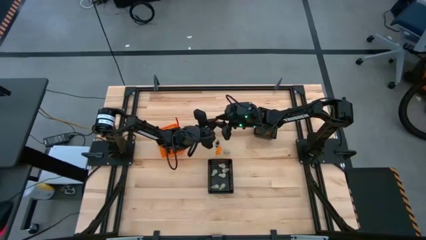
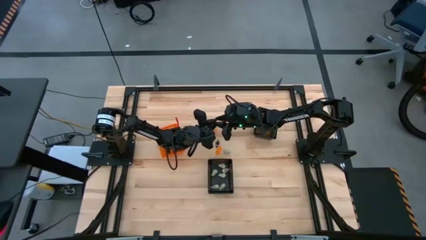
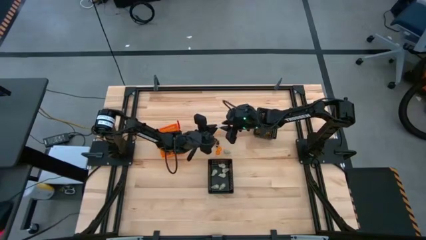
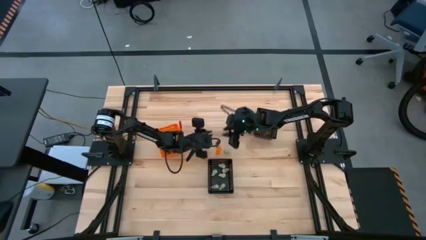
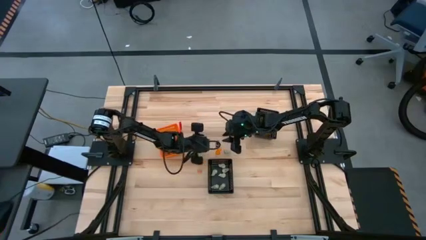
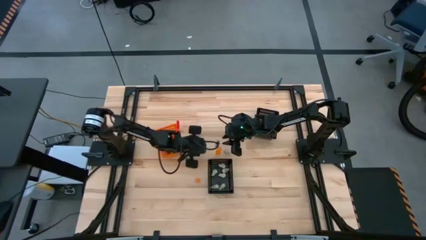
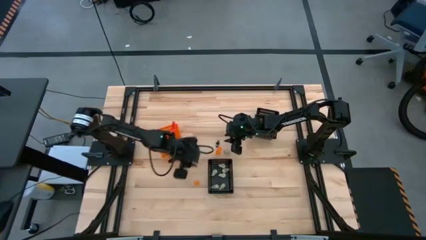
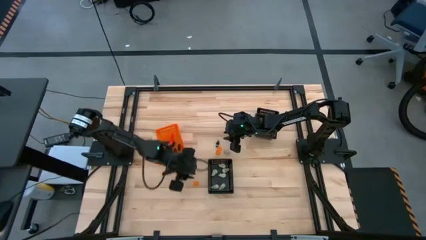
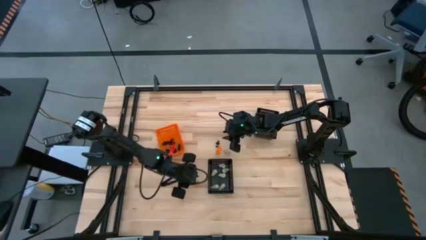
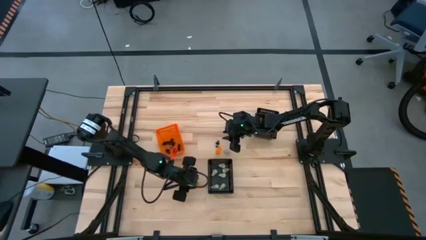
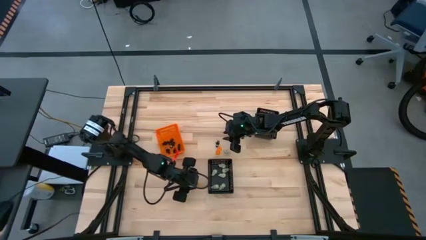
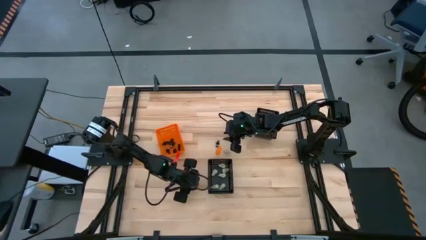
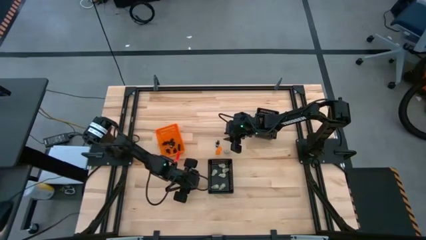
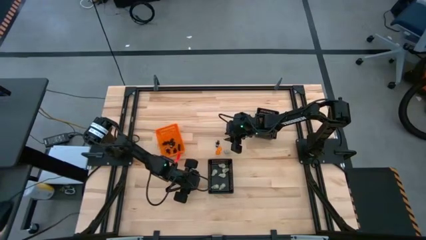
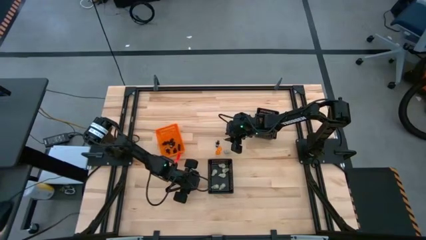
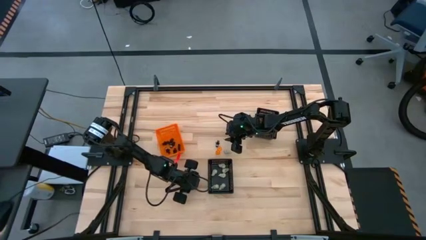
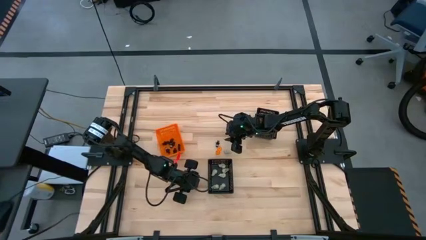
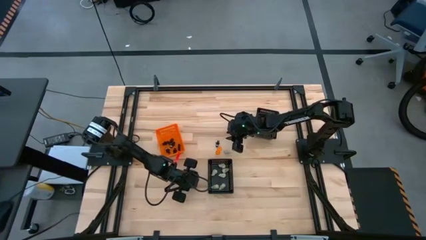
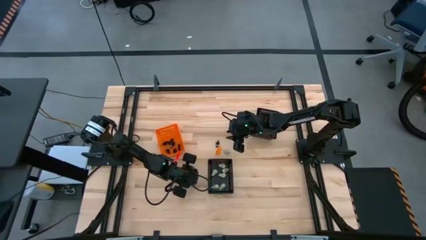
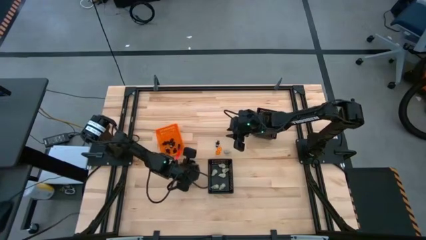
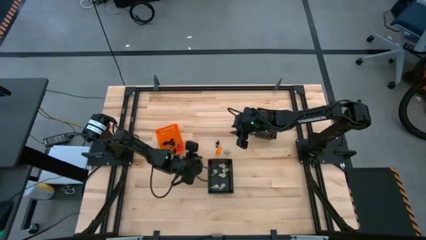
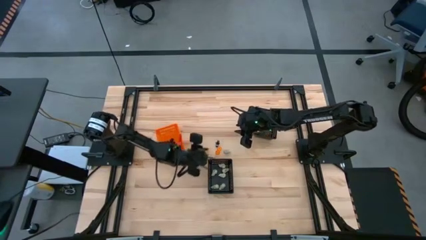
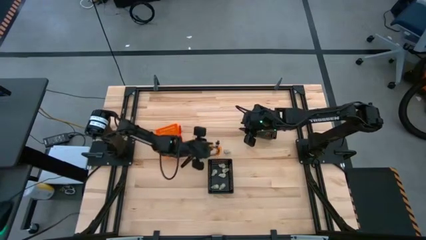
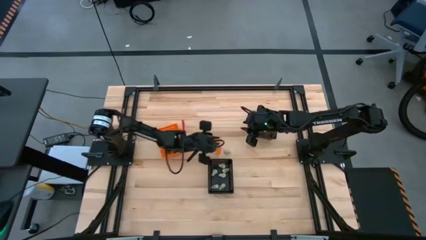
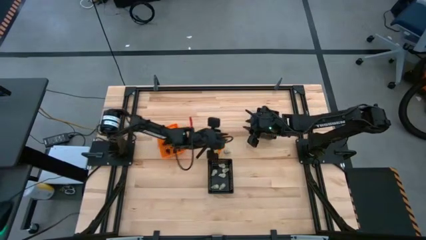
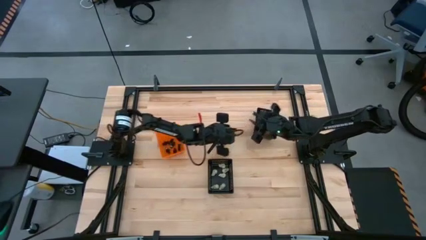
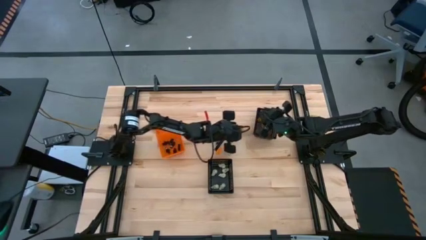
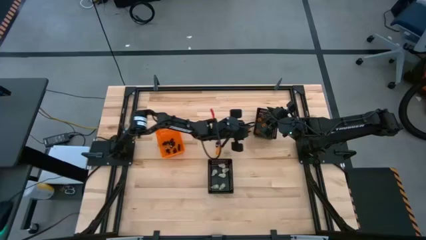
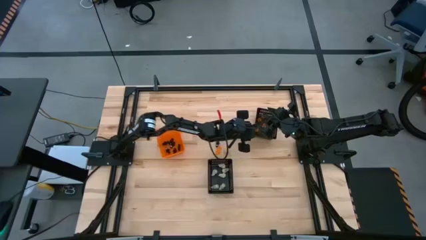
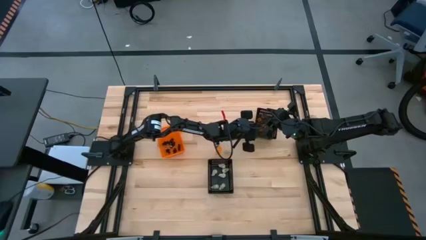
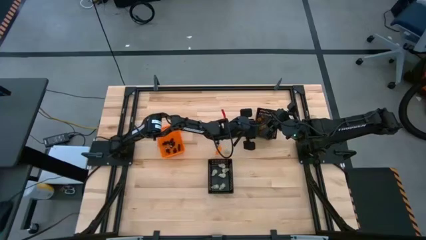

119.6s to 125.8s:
Task: Sort Halloween decoration
Put the orange pumpkin toy into the top black bin

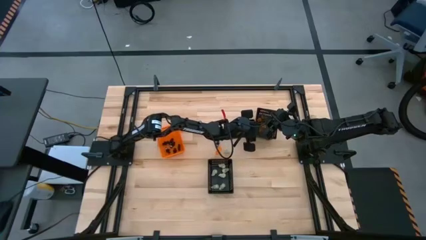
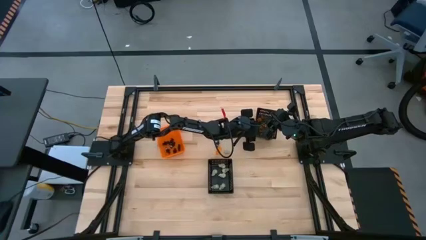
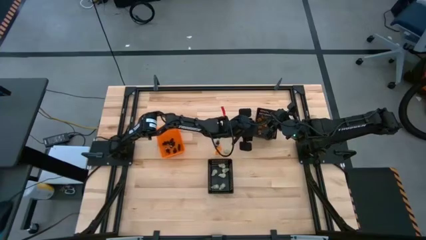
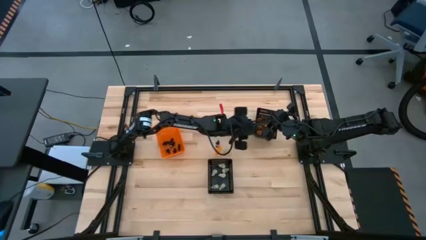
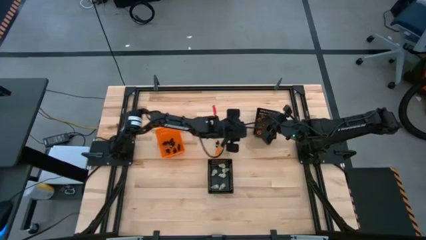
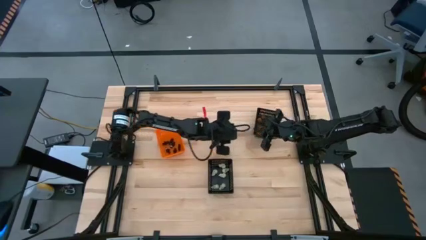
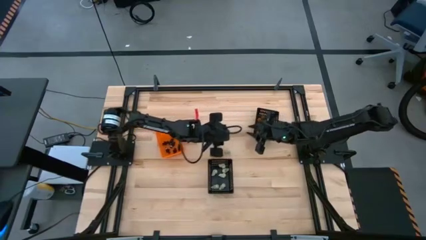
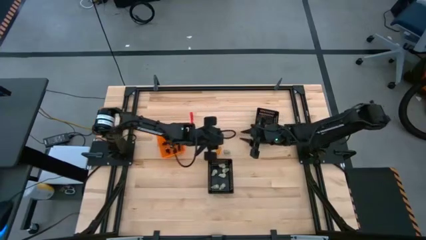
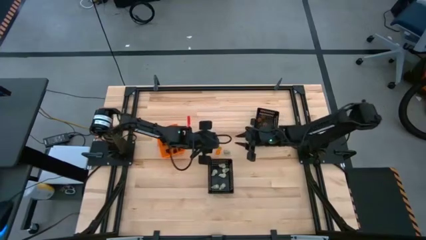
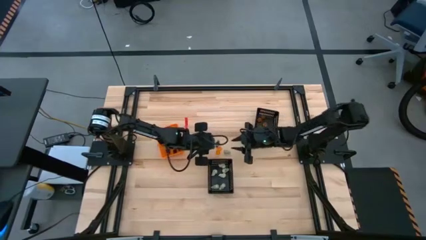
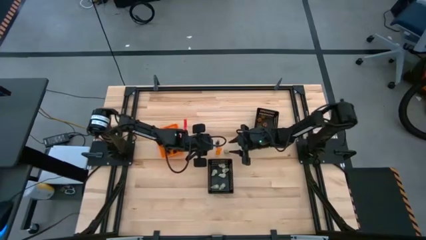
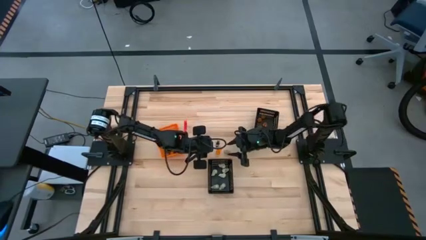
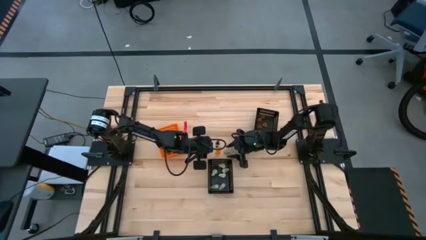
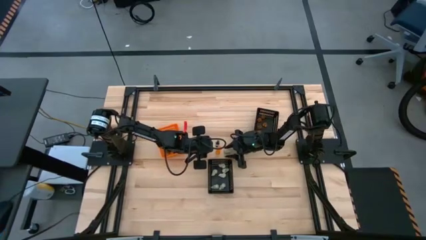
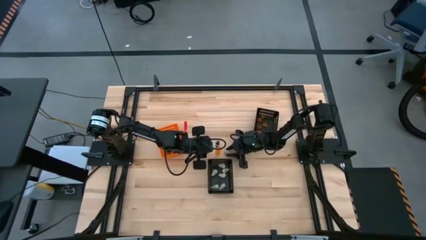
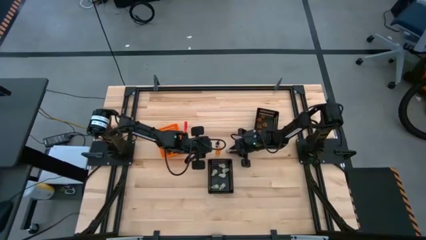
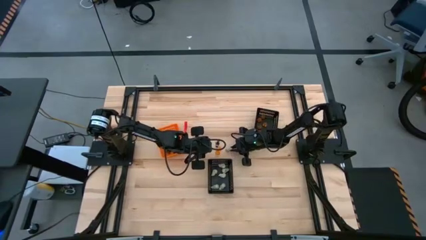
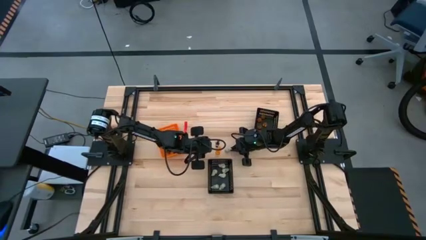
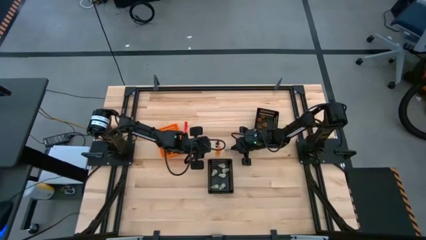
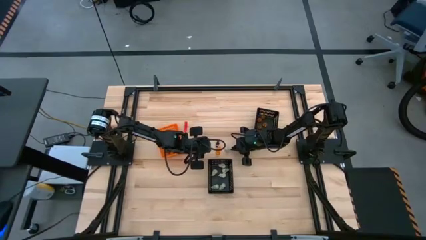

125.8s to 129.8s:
Put the white skull toy into the bottom black bin

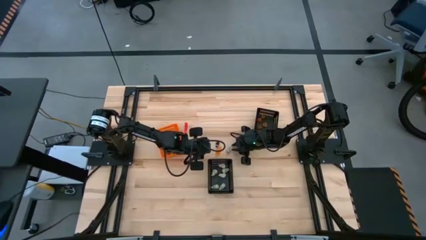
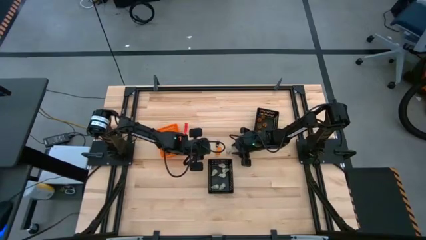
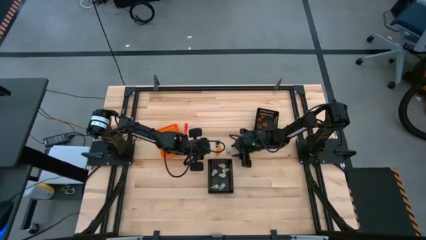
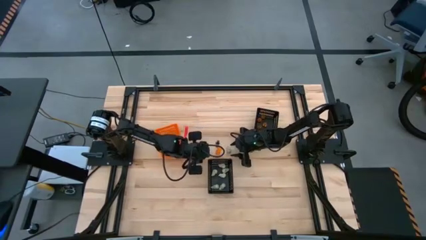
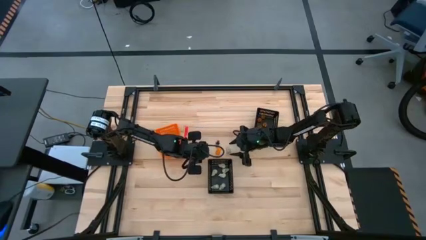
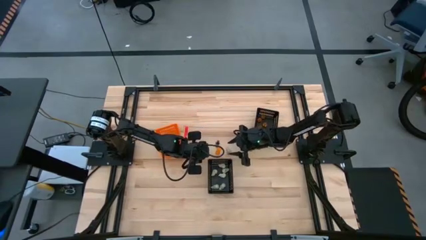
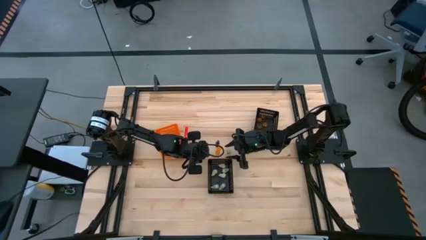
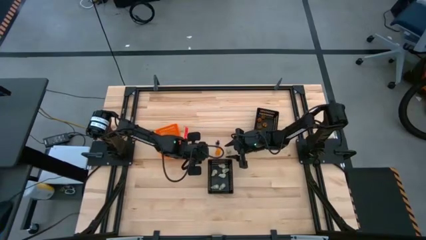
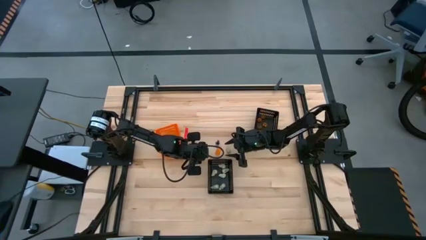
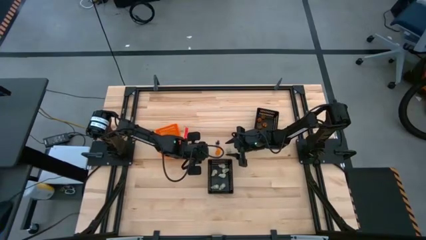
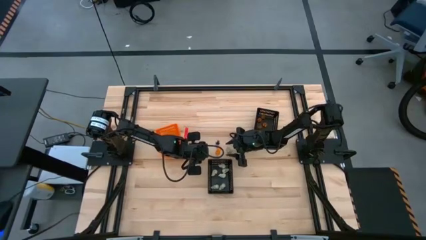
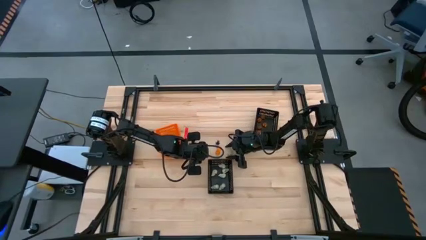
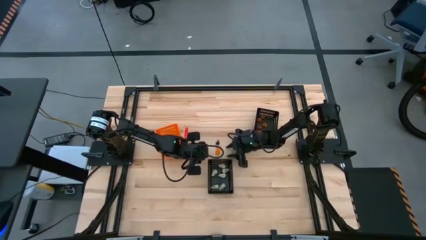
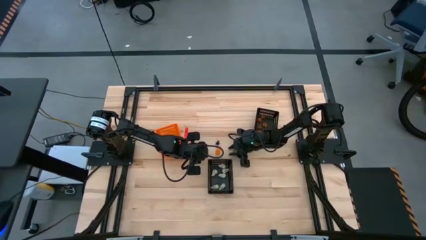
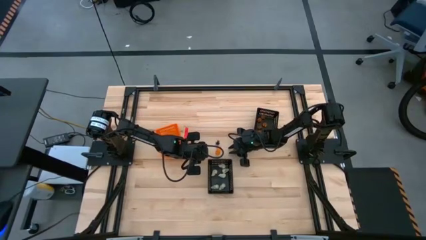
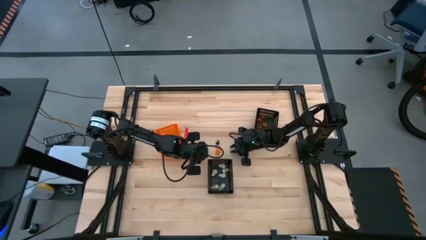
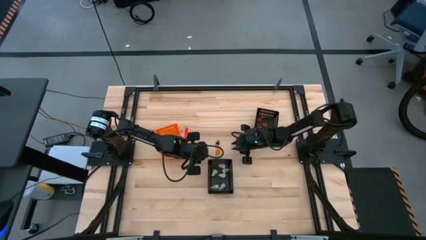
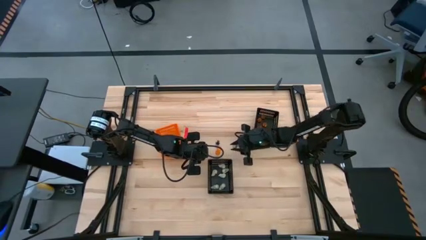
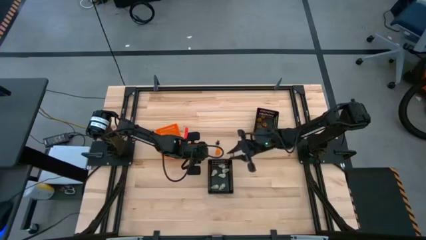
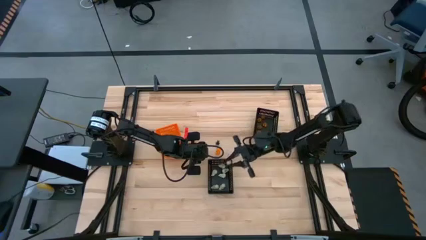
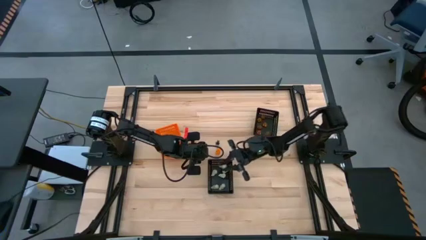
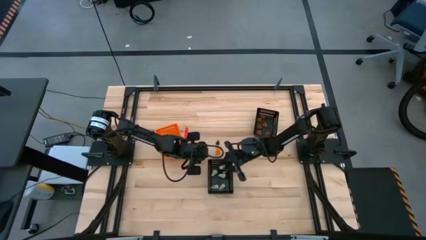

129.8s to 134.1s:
Put the white skull toy into the bottom black bin

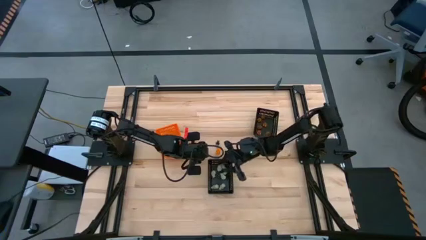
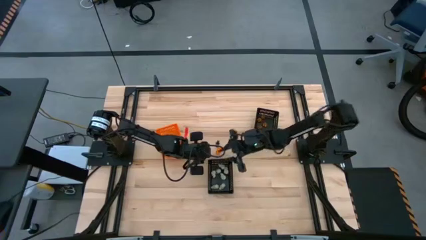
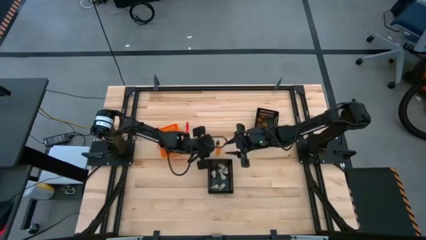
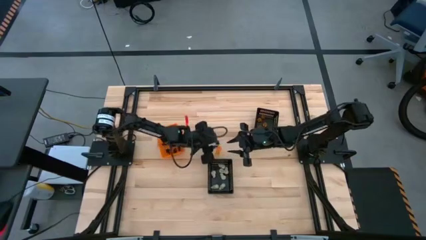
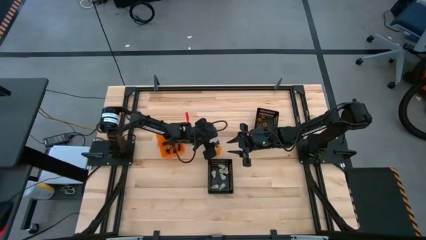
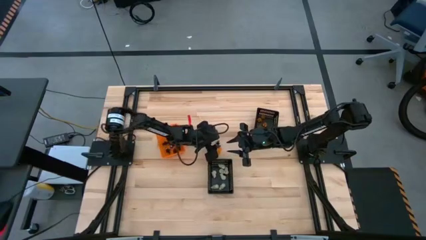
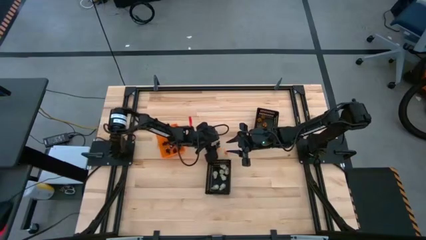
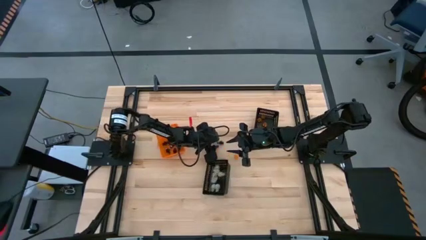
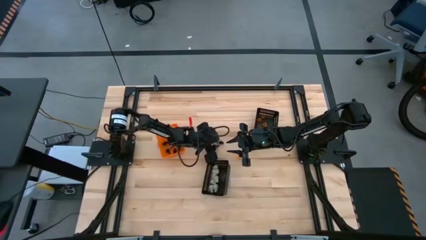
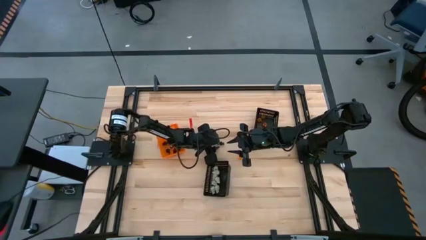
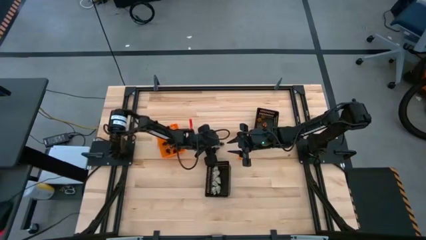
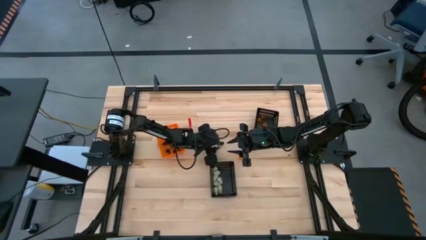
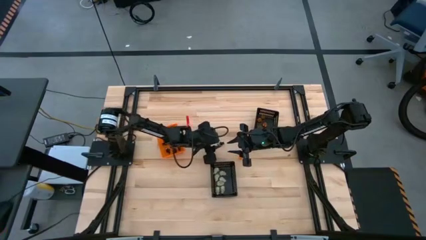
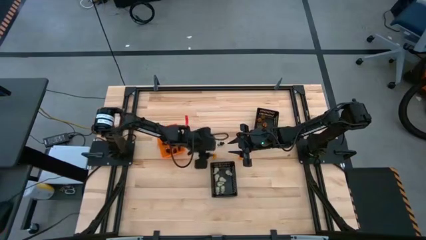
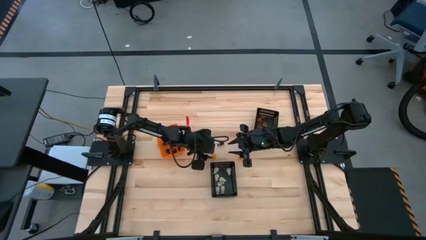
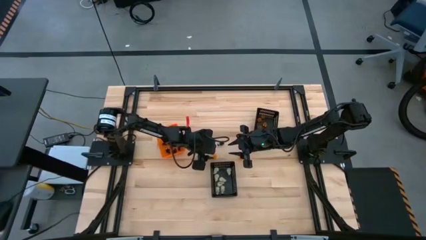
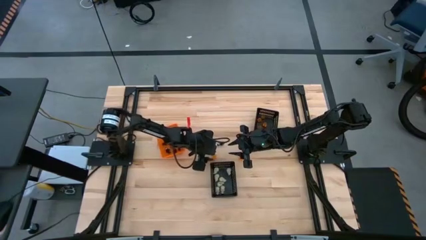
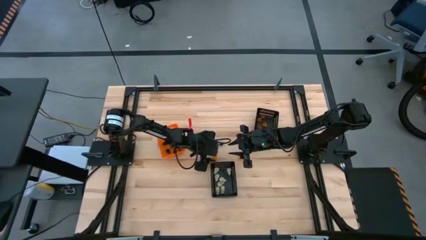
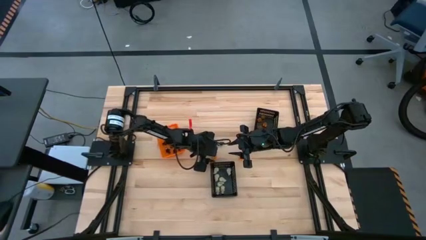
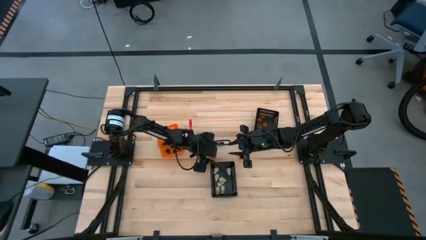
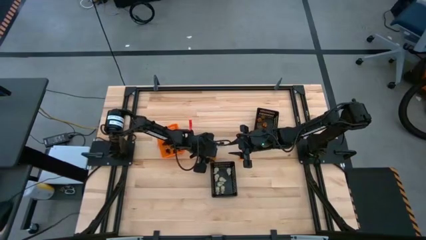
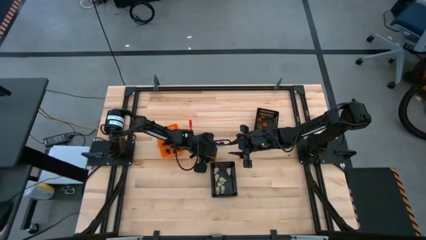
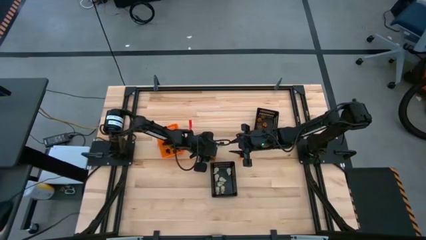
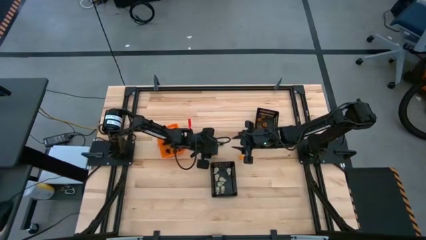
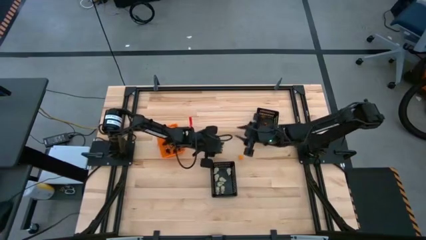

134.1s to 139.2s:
Put the orange pumpkin toy into the top black bin
